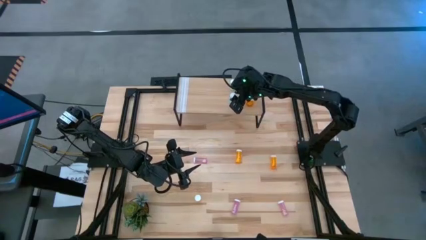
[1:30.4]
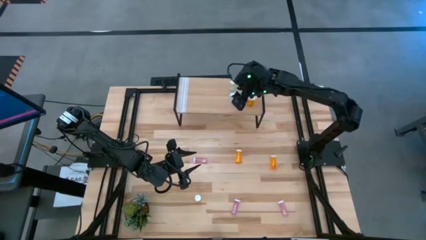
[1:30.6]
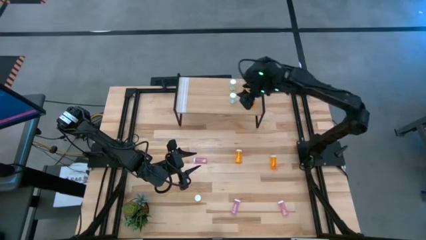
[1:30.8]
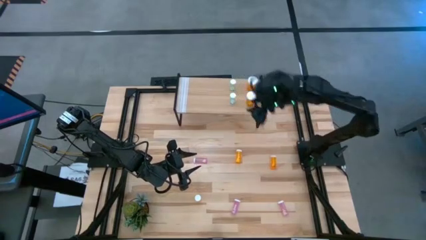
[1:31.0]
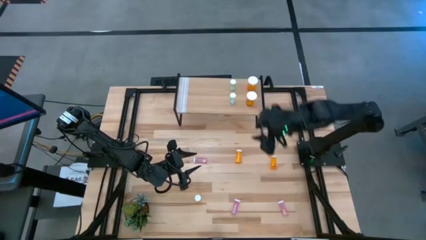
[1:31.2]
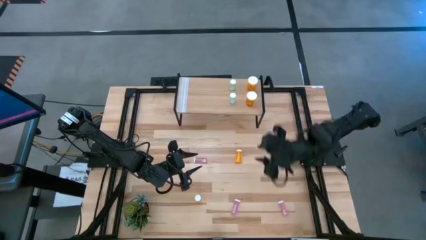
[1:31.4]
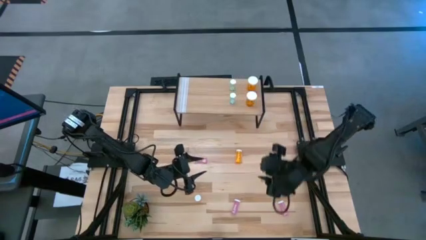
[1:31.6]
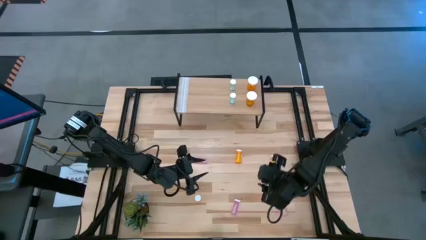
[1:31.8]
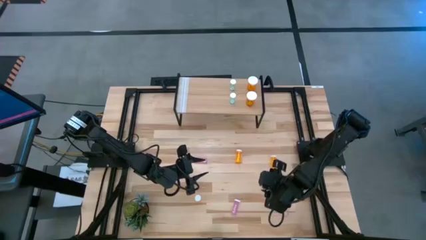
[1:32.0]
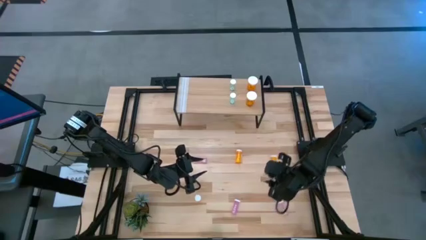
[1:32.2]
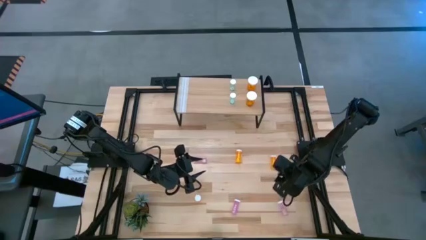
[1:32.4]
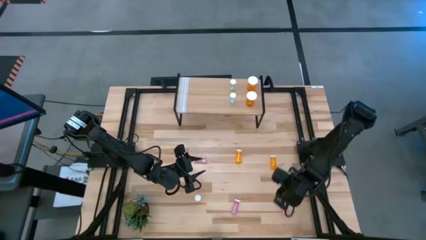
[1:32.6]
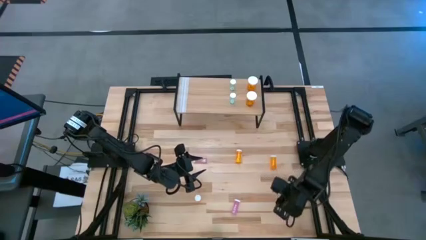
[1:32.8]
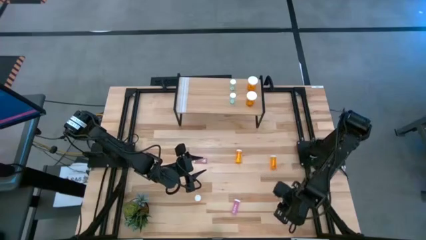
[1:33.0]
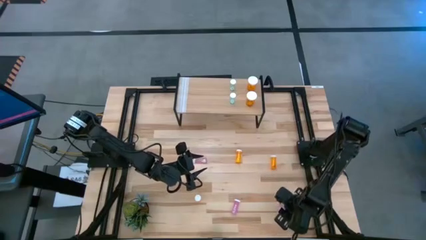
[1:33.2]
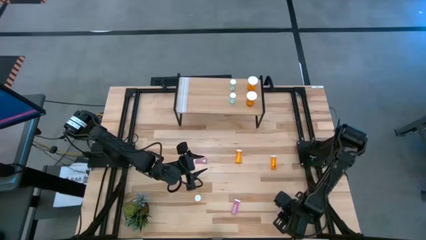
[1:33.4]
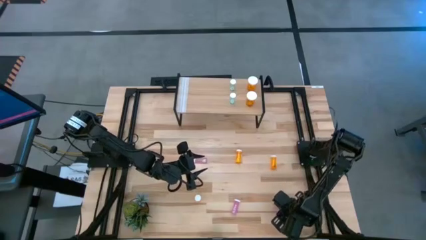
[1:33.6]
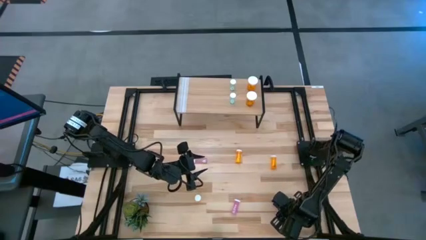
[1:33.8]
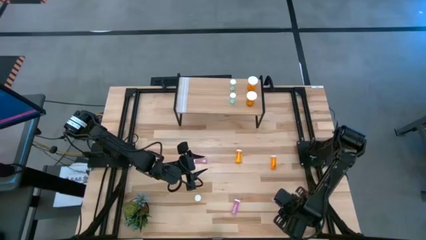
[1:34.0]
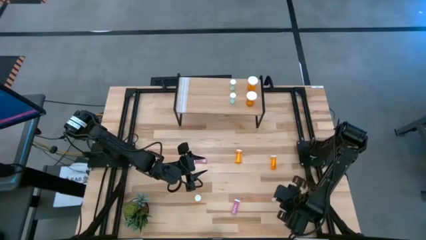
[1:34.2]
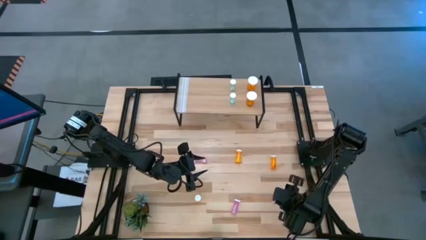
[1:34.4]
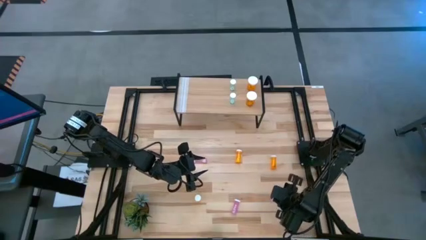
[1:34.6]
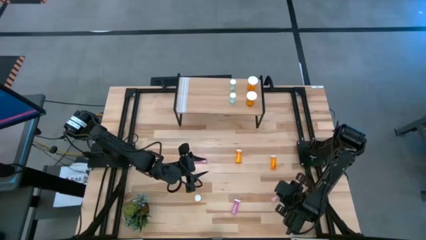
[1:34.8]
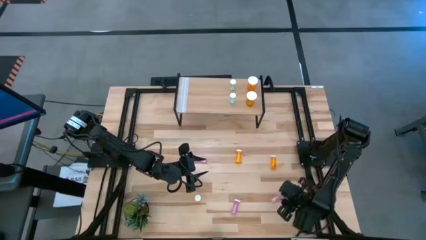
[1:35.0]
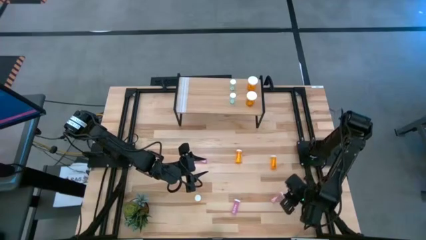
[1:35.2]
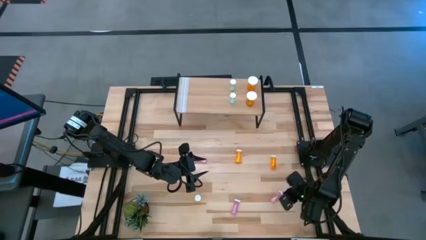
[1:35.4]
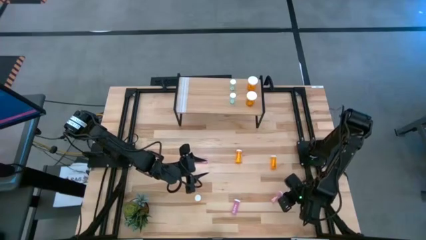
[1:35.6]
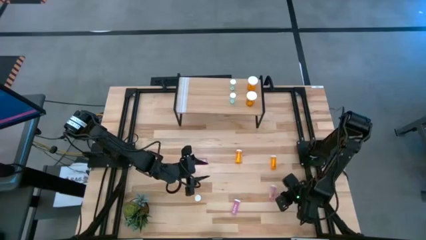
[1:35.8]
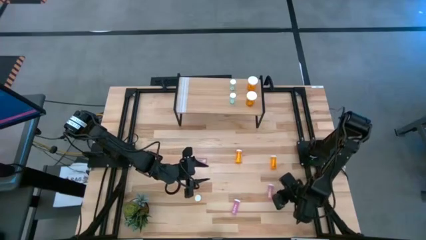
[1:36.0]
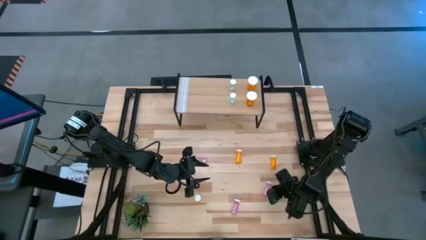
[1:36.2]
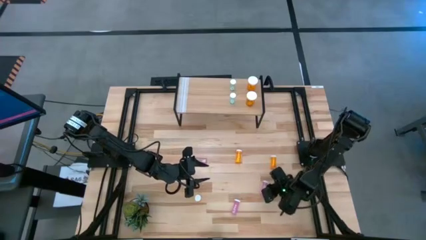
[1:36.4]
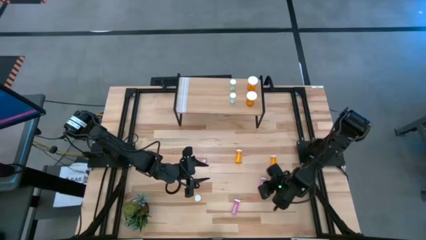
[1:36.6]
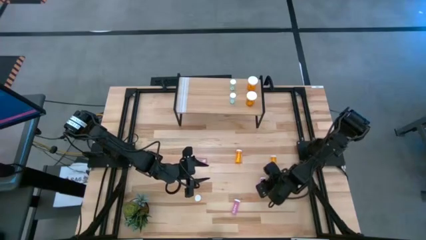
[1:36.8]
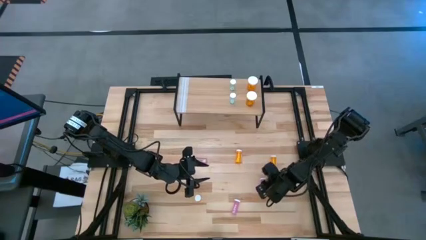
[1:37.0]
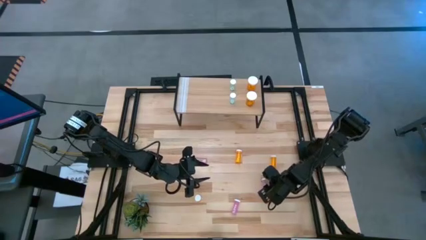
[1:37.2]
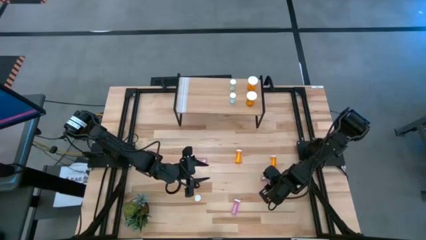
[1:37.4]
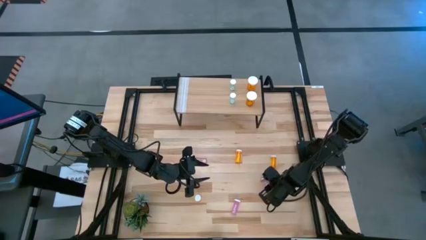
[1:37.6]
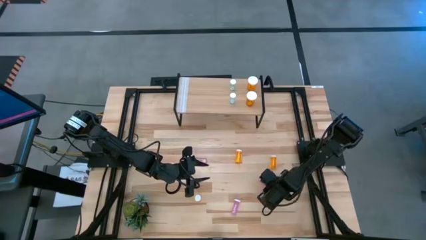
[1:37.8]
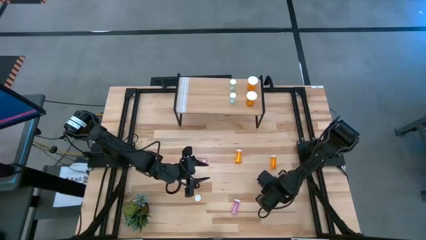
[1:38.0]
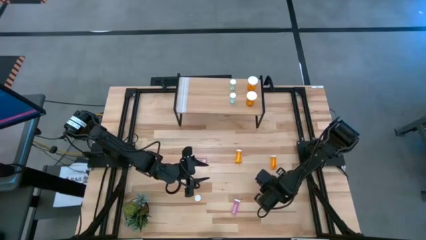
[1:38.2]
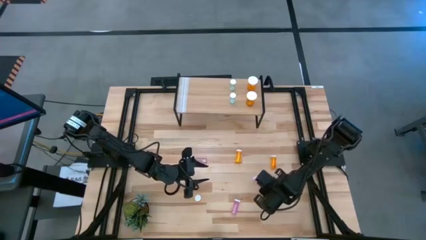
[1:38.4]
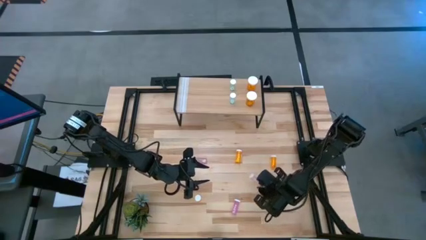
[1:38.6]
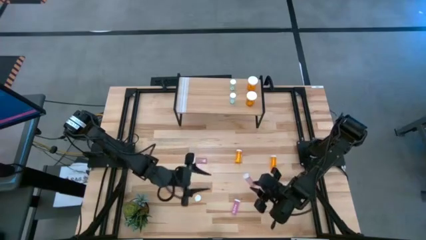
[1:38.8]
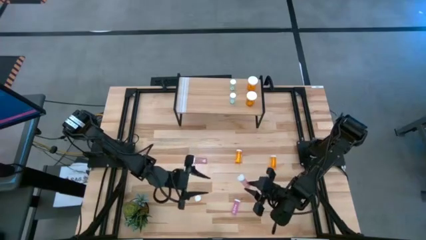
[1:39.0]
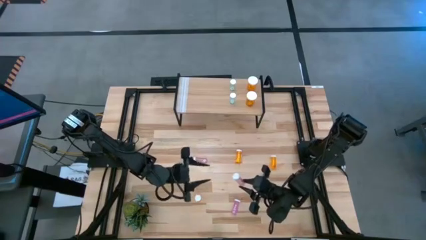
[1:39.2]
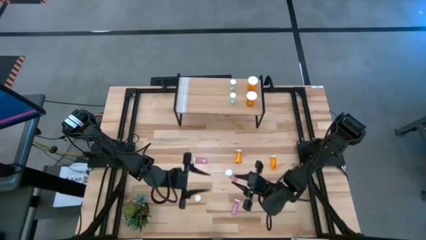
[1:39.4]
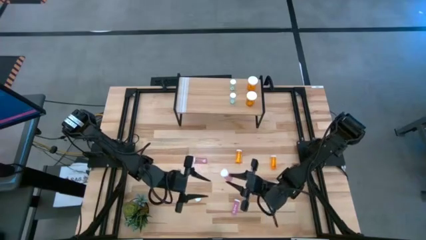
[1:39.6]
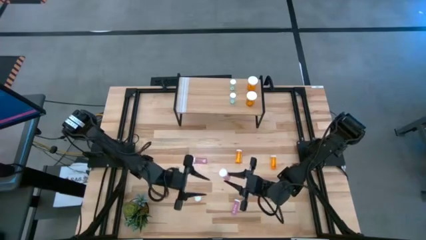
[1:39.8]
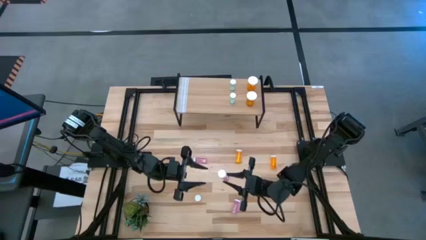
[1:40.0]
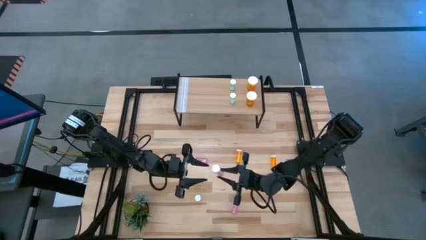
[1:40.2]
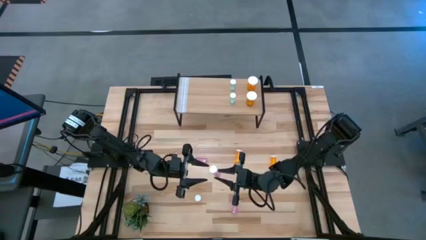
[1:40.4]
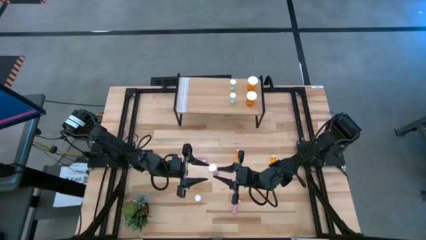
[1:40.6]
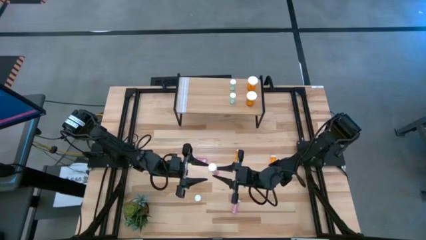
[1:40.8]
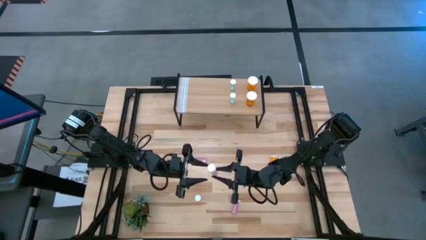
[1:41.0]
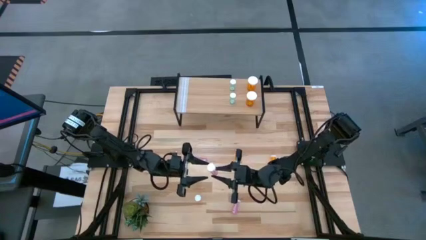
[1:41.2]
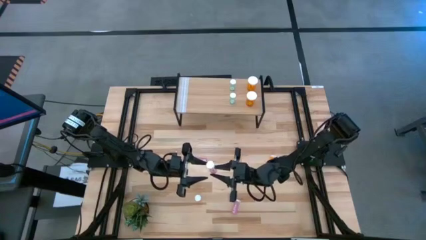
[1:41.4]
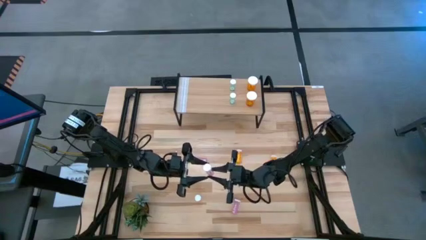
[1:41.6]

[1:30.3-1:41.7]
Task: Pick and place medicine bottles onto shelf by color
Put the bottom right pink pill bottle on the shelf
